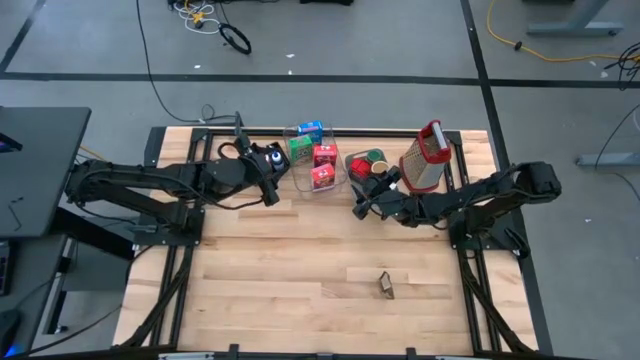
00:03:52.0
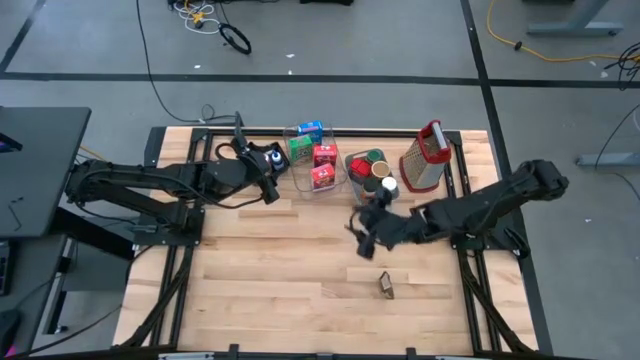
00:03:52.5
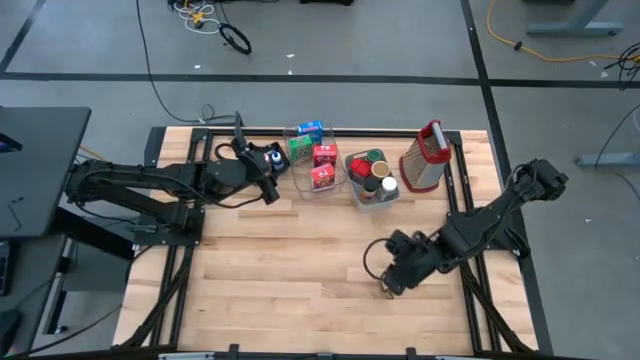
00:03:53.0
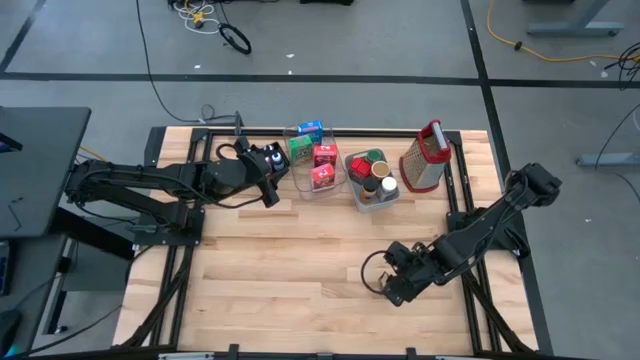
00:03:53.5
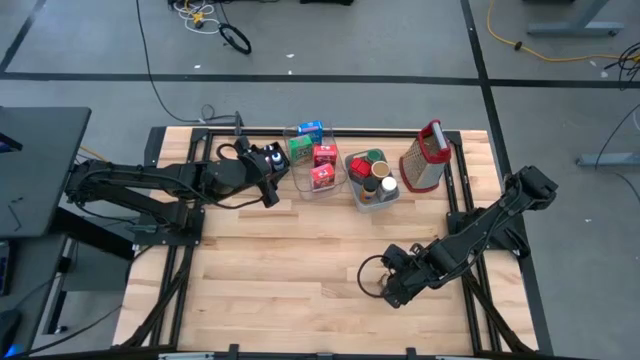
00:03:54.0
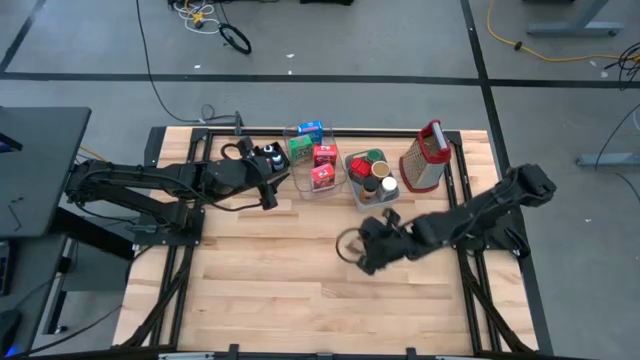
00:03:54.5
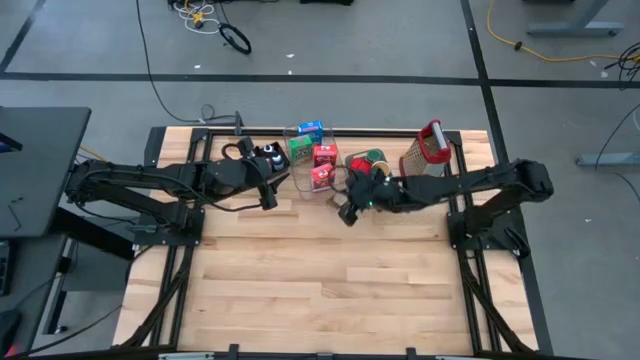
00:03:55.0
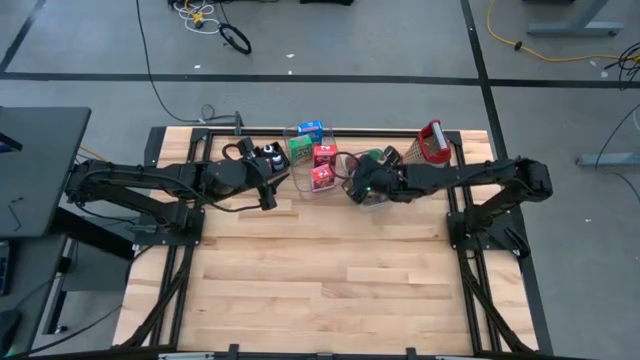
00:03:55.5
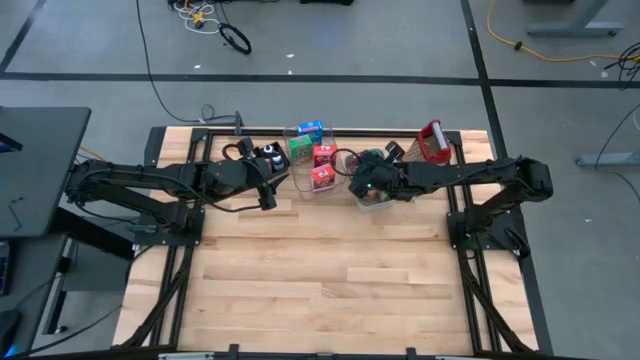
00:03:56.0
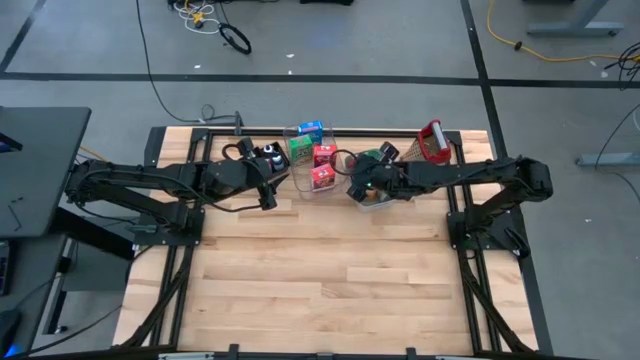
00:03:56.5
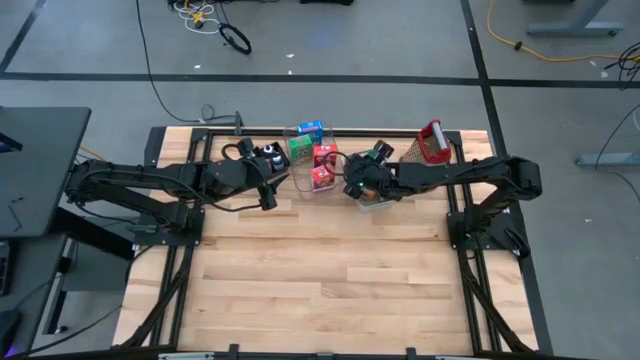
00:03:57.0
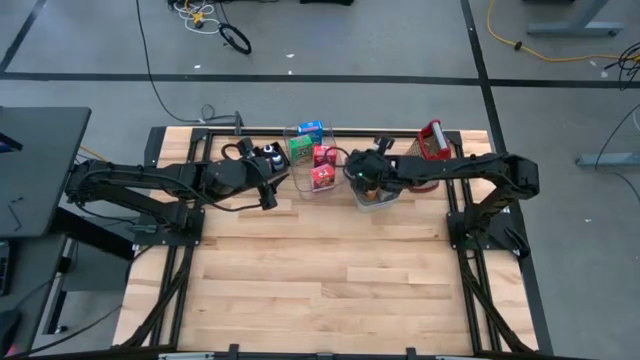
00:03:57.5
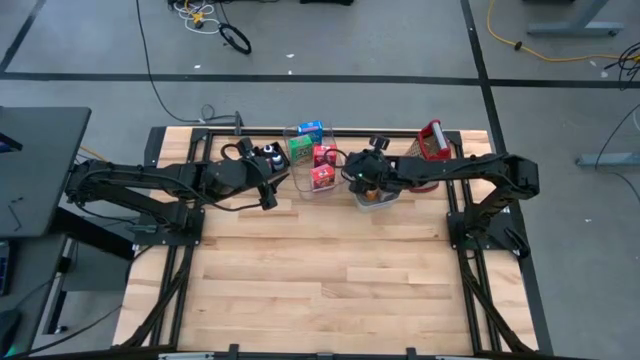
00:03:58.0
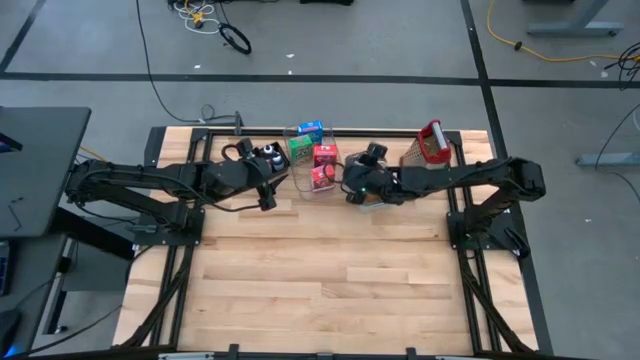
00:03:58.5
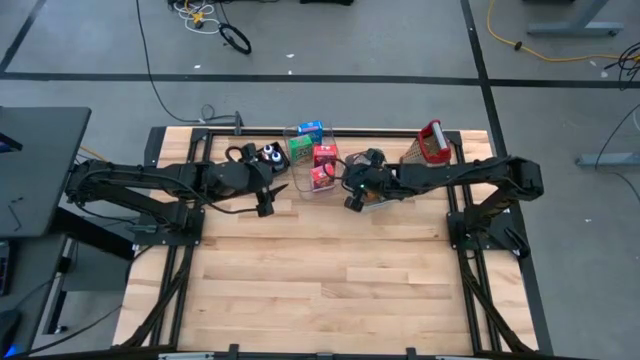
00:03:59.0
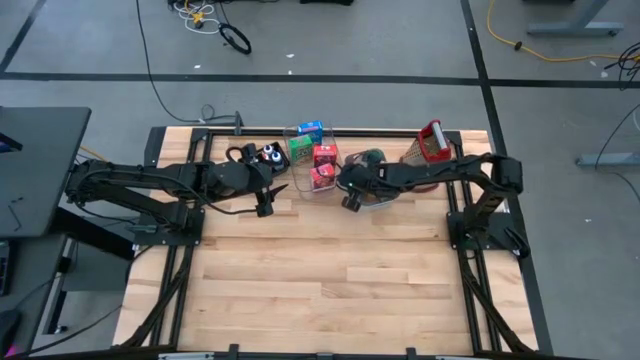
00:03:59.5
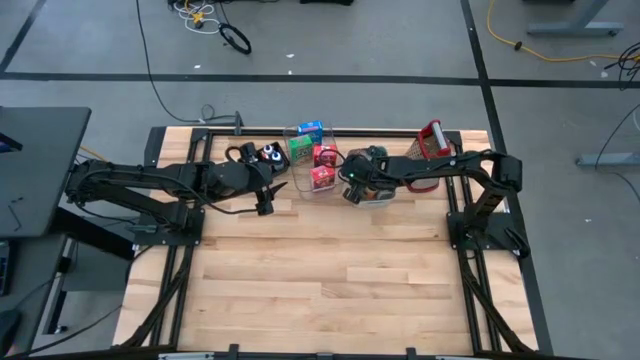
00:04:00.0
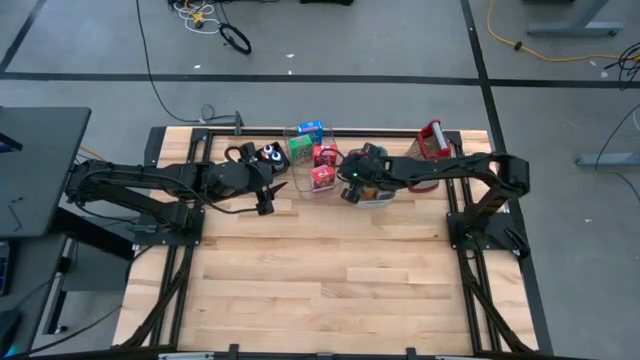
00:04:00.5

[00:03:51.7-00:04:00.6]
Task: Pick & Place Kitchen Items
Put the orange spice pack into the gray bin

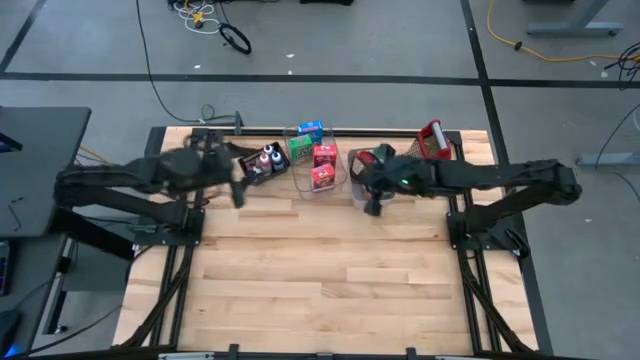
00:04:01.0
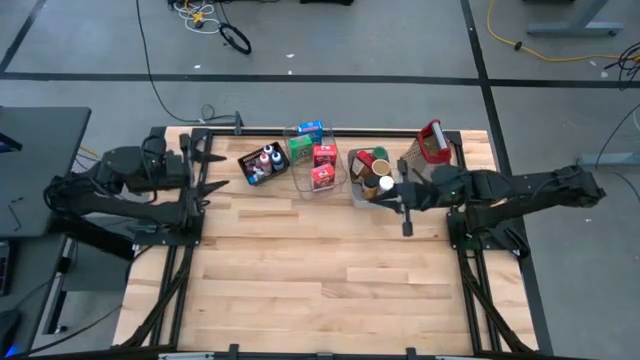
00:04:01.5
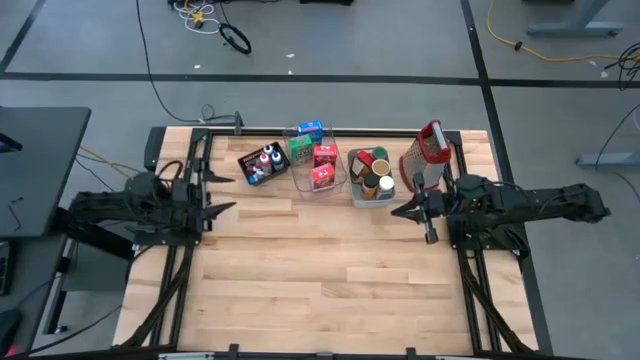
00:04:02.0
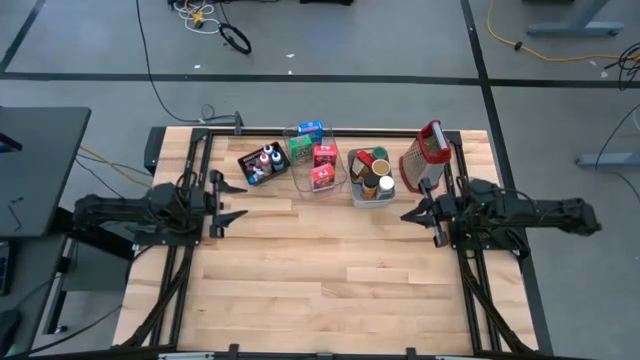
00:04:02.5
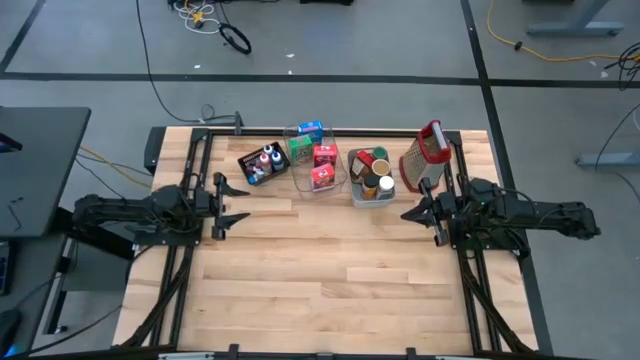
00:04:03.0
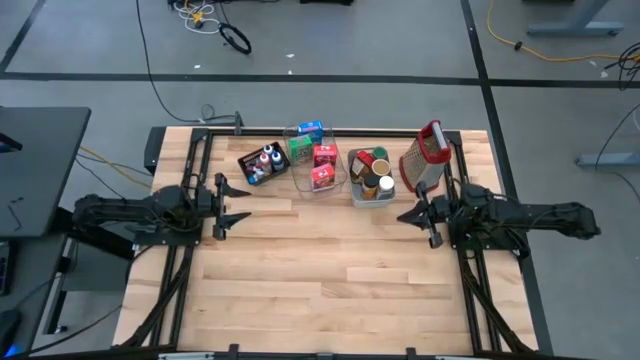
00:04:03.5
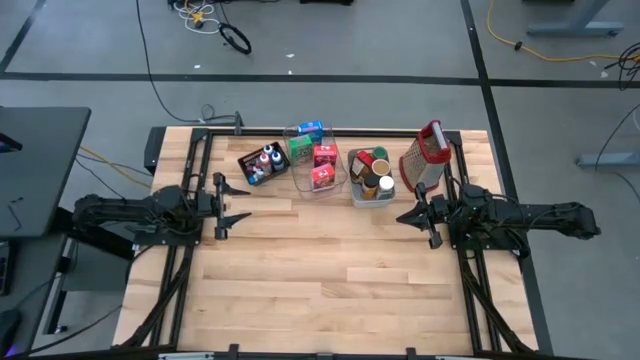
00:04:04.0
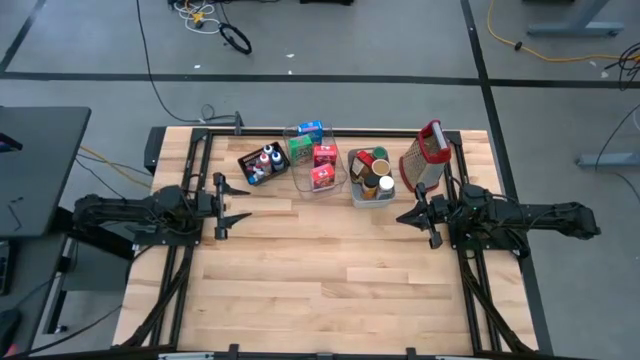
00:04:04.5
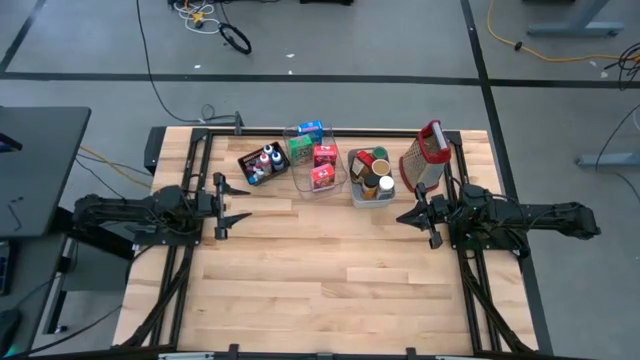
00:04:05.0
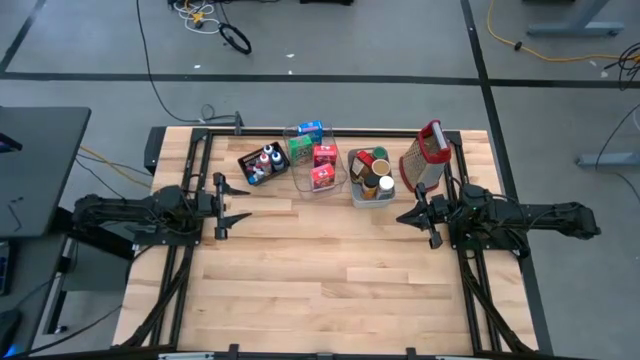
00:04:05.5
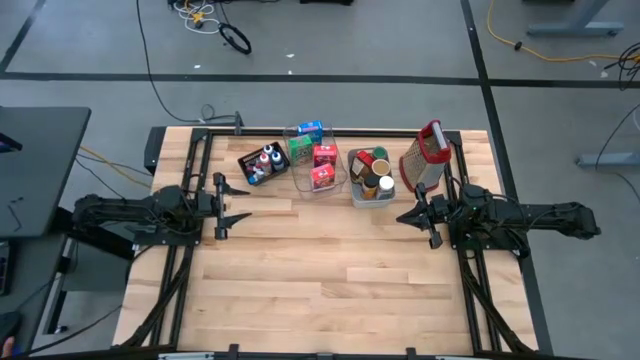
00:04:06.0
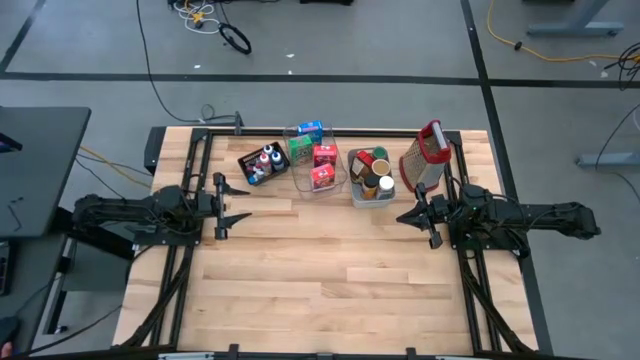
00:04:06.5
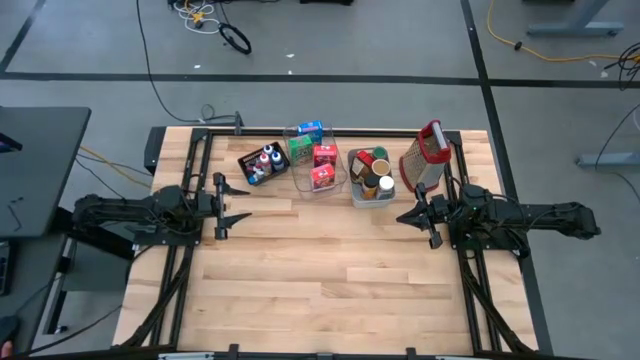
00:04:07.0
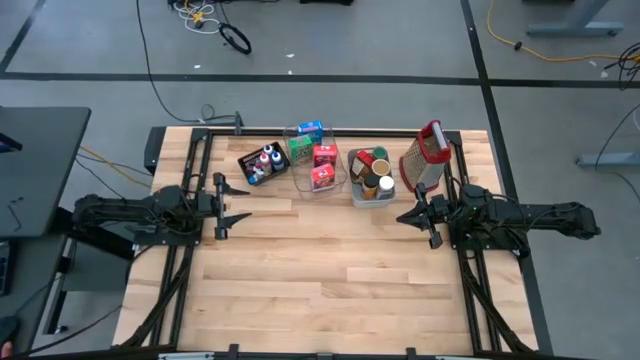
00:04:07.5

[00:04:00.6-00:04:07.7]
Return to Home Position

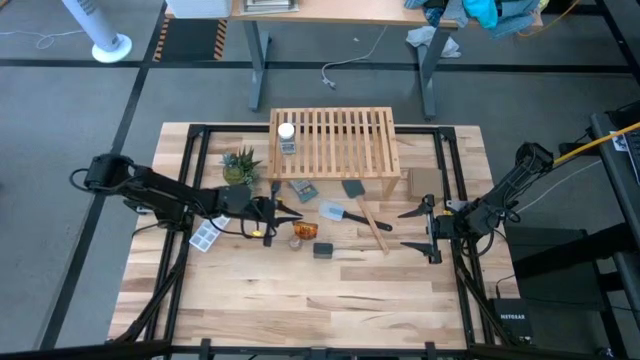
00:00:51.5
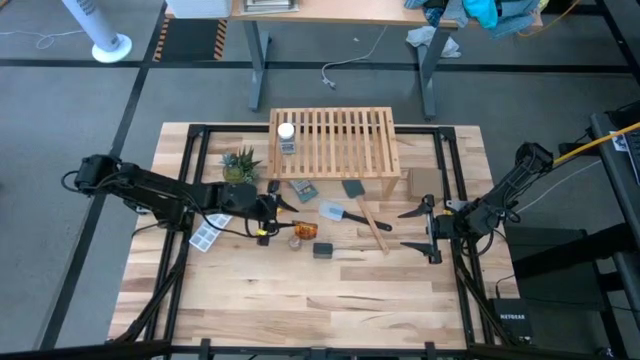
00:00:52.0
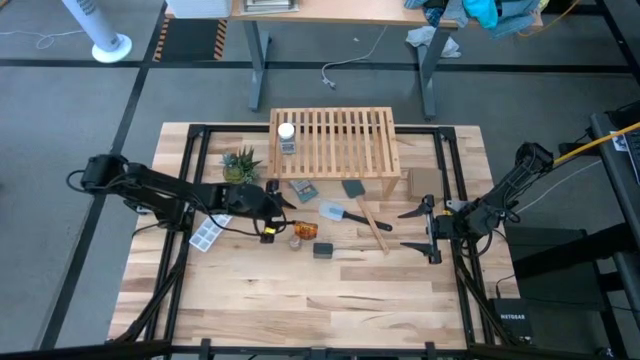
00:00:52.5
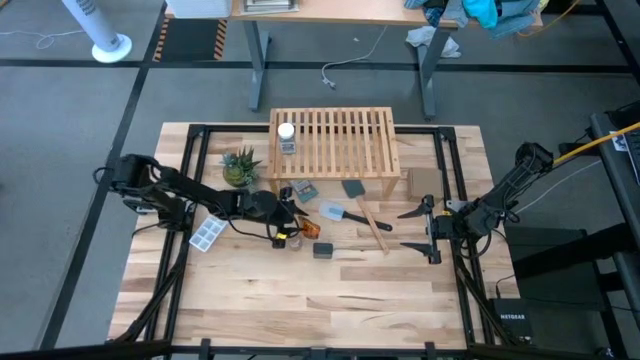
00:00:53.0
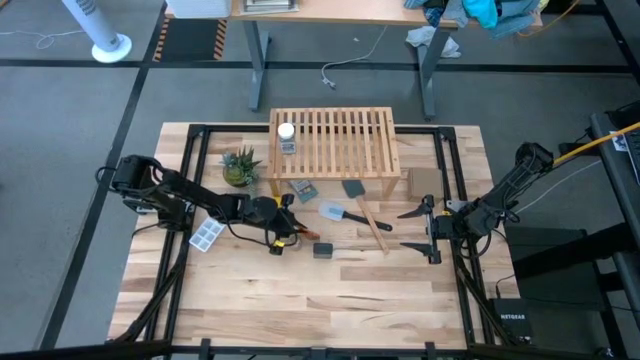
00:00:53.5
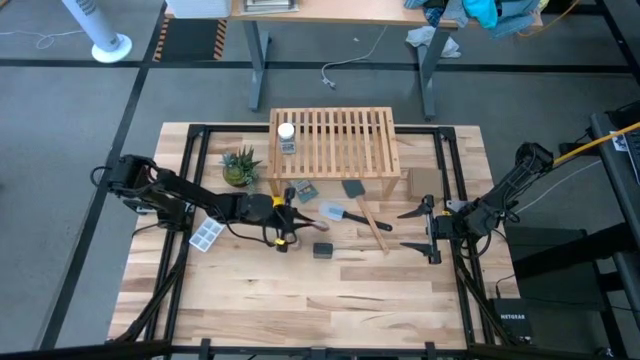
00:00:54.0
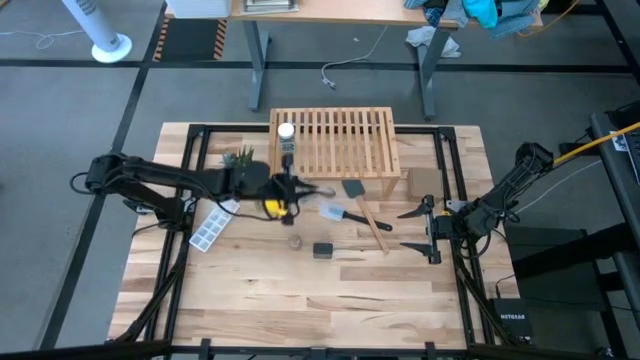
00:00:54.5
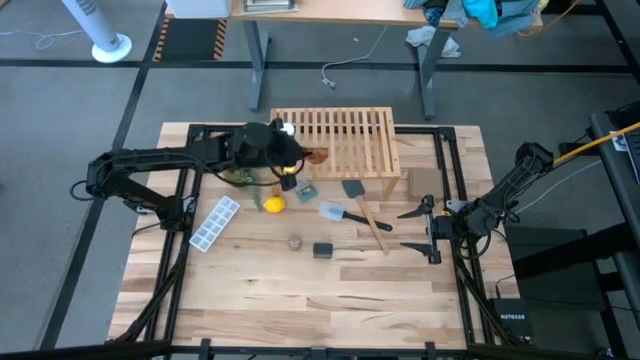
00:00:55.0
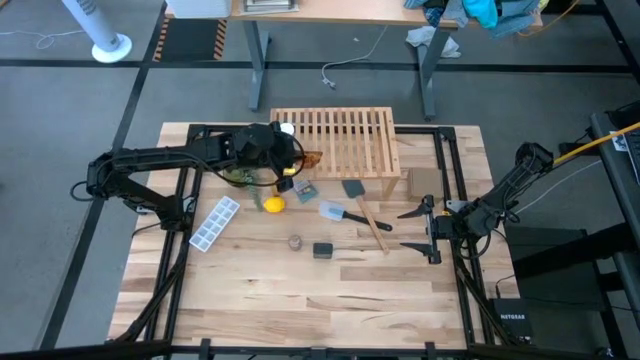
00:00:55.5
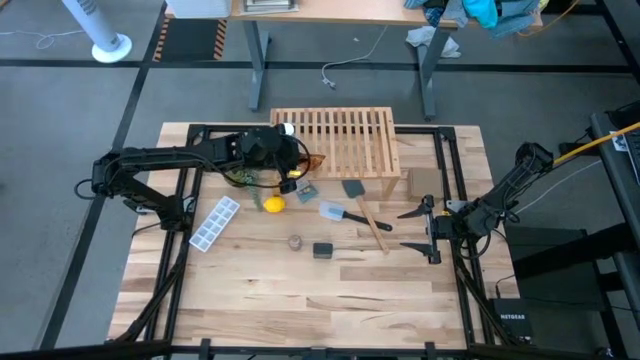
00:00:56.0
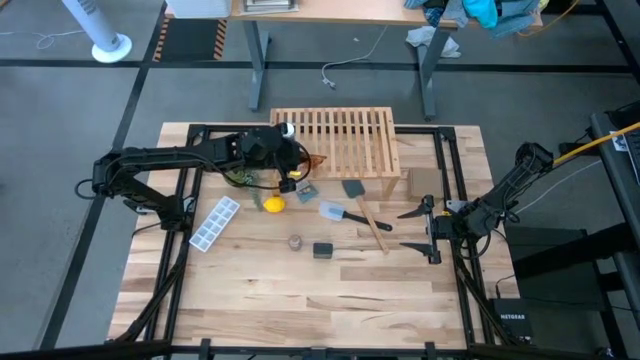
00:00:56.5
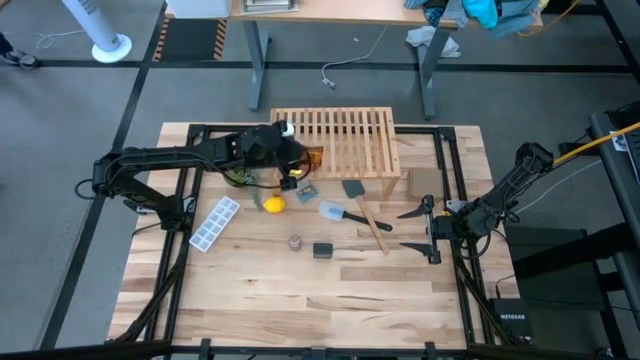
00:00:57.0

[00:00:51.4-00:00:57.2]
Task: Shelf spices
Put the orange seasoning bag on the shelf
